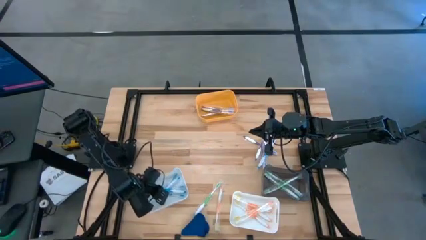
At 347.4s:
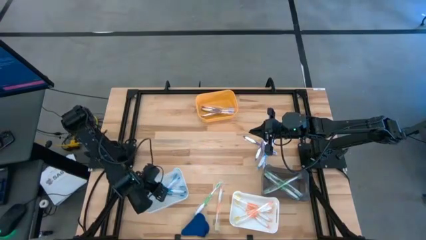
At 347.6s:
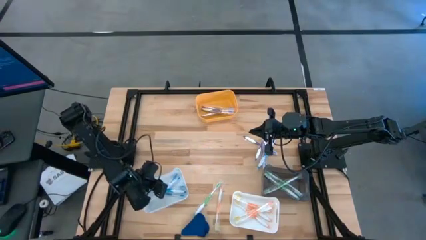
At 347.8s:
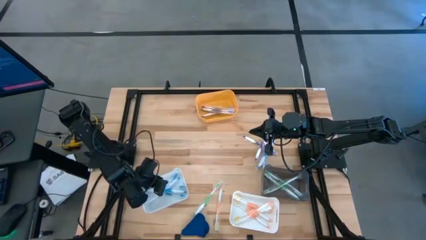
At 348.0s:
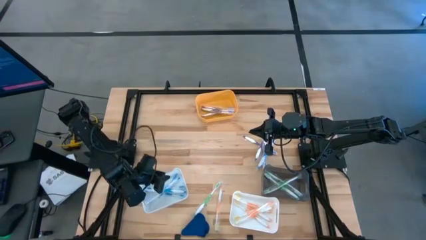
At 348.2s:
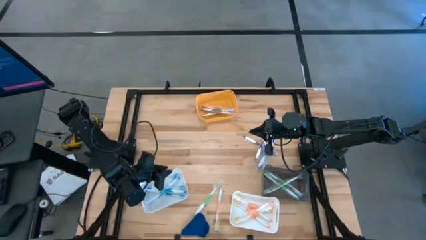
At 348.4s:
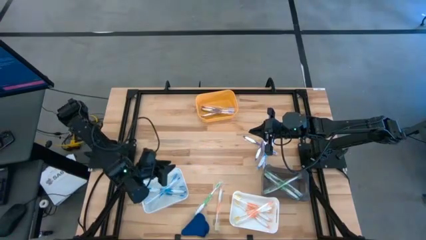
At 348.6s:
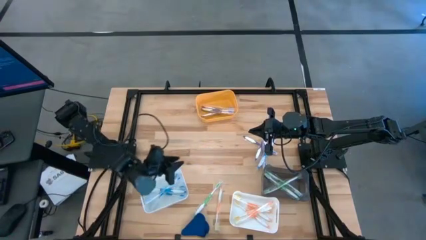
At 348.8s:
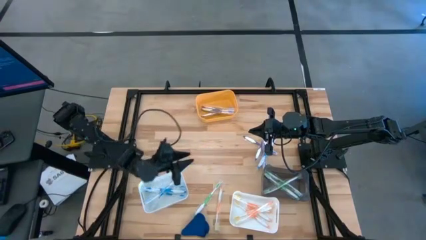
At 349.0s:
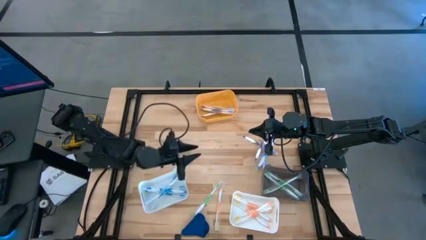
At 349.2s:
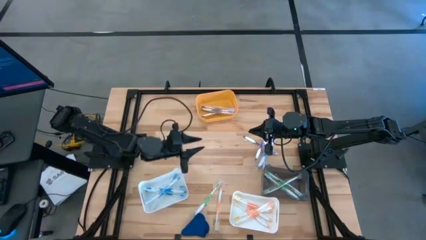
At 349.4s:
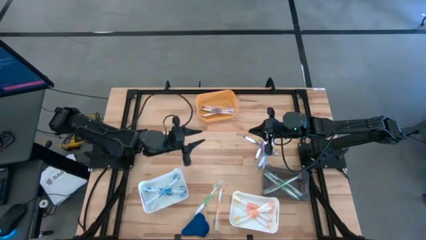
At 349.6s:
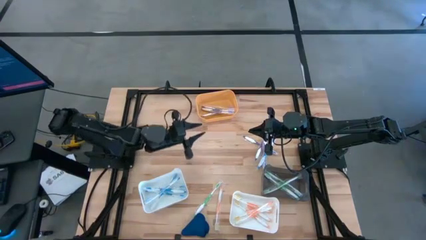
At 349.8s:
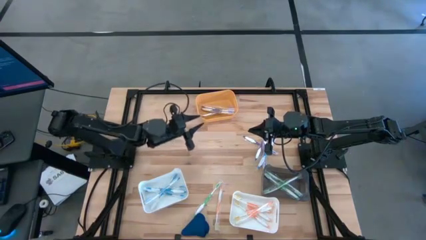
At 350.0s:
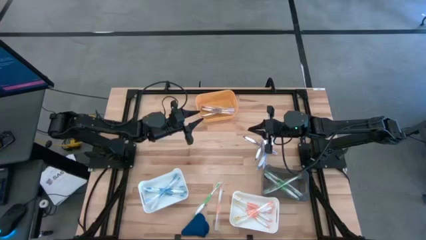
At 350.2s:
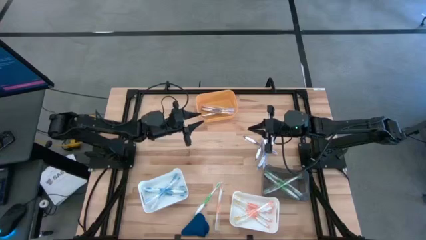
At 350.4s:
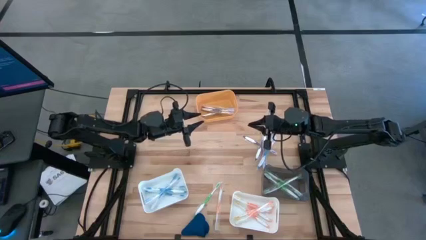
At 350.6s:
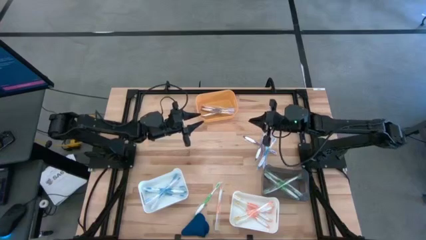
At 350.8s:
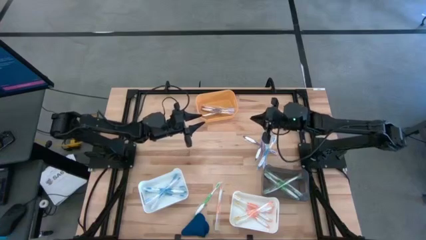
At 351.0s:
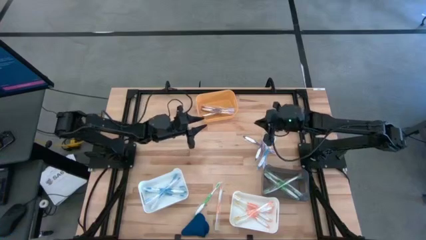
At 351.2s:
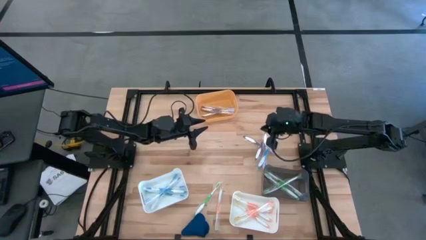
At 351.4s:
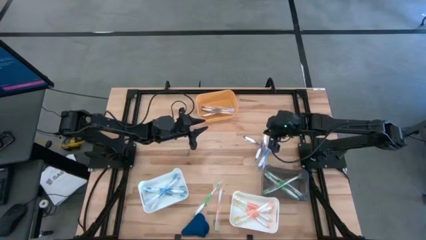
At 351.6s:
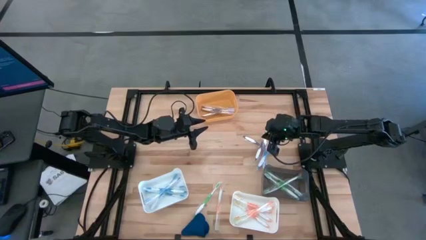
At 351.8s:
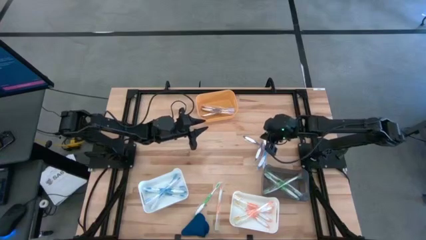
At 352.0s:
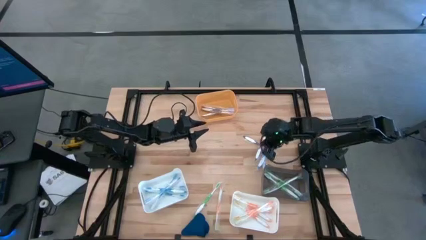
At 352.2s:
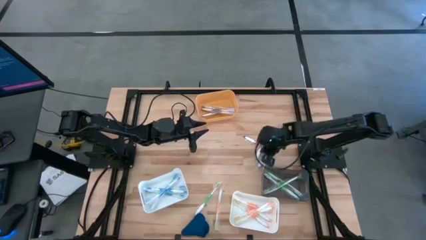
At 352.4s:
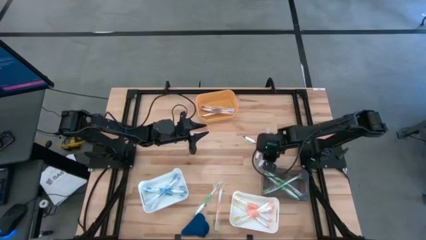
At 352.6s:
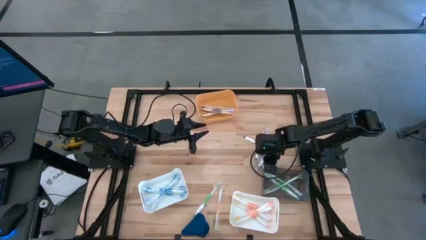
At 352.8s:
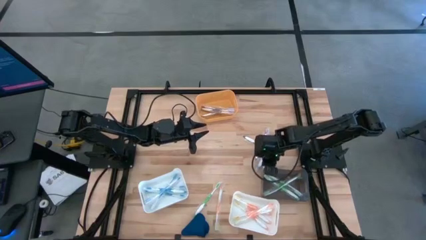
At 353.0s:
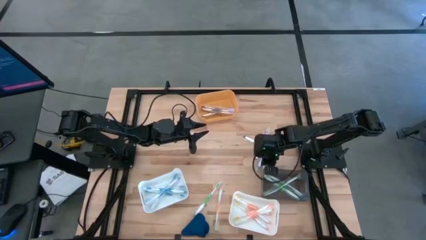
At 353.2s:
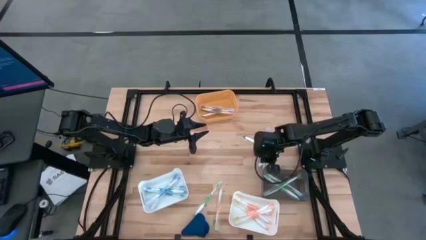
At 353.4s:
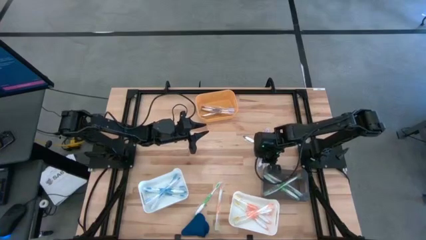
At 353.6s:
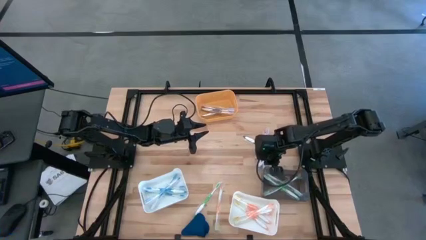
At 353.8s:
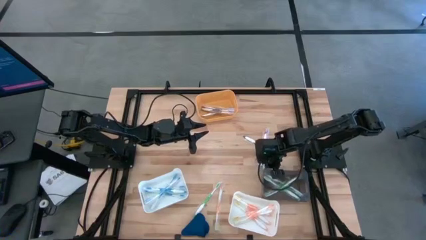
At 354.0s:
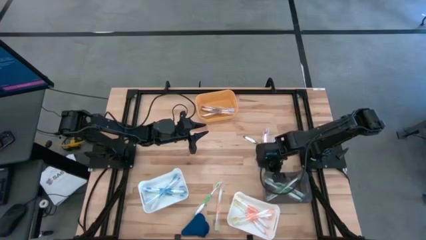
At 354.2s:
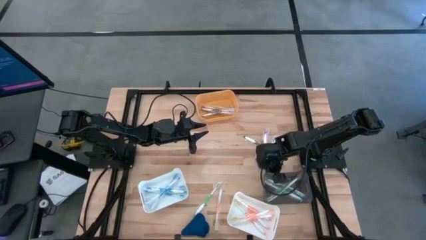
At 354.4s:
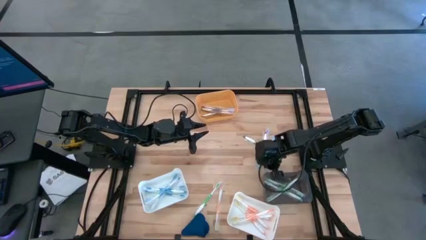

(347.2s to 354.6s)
Task: Pick & Place Toothbrushes
Put the purple toothbrush into the yellow bin

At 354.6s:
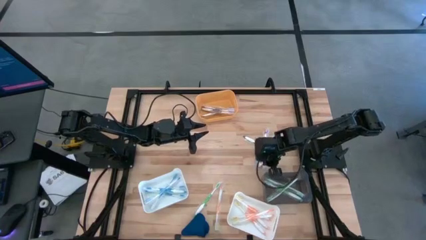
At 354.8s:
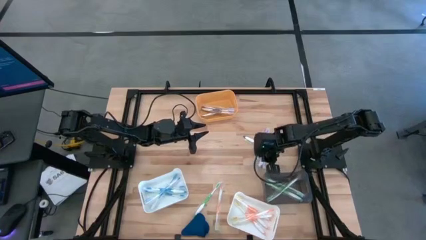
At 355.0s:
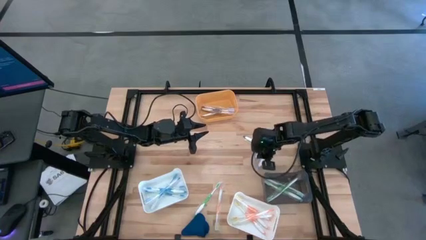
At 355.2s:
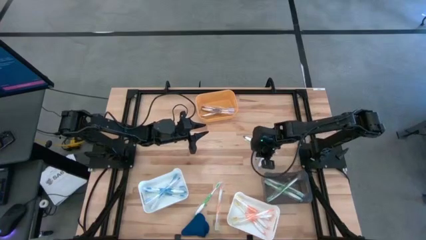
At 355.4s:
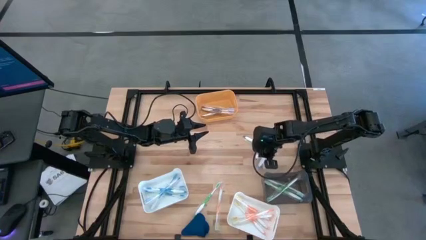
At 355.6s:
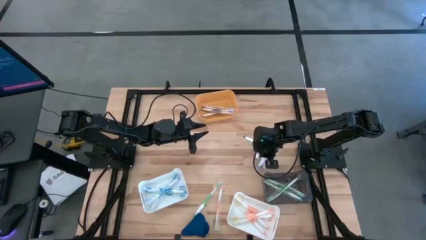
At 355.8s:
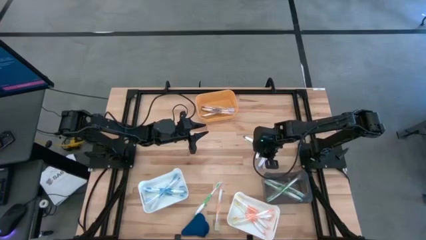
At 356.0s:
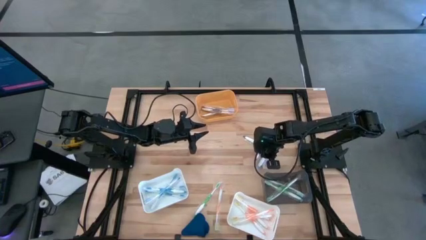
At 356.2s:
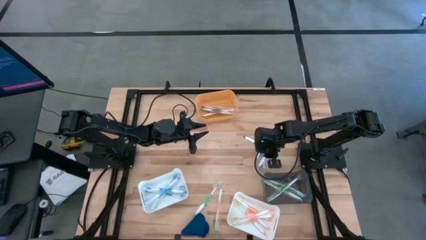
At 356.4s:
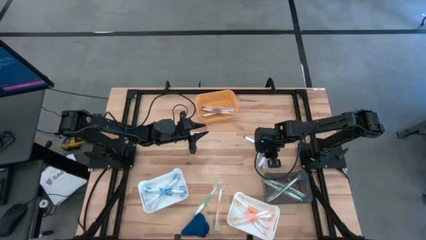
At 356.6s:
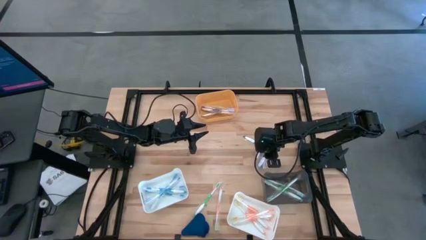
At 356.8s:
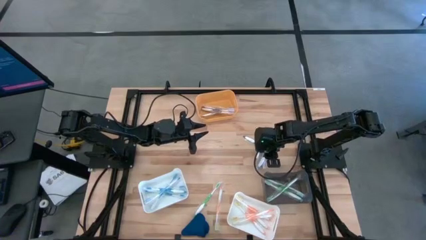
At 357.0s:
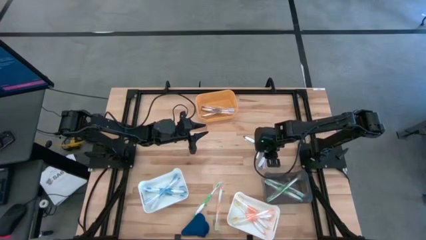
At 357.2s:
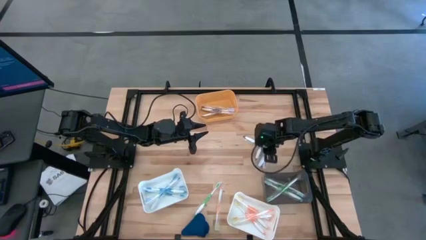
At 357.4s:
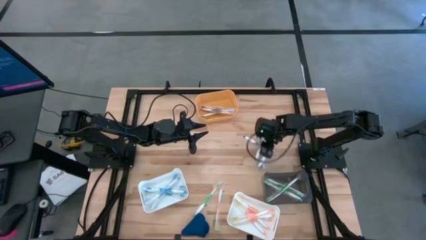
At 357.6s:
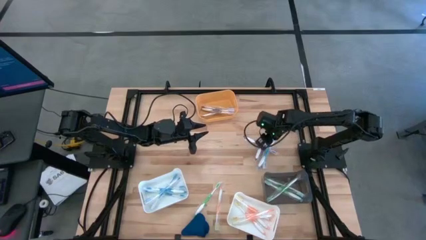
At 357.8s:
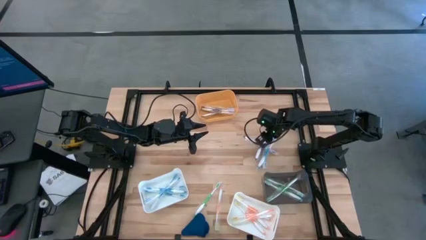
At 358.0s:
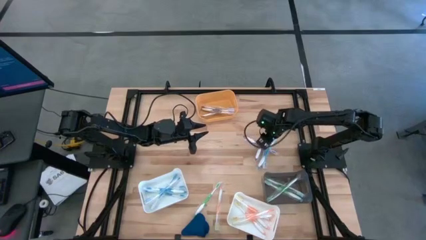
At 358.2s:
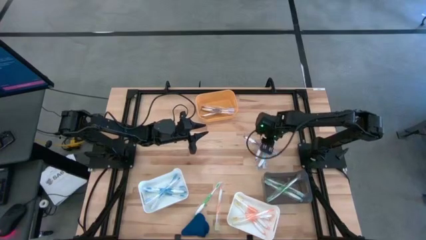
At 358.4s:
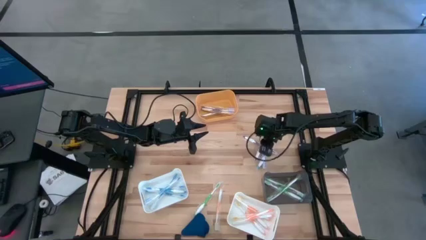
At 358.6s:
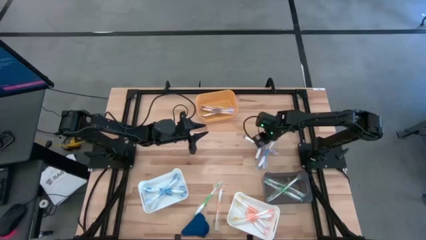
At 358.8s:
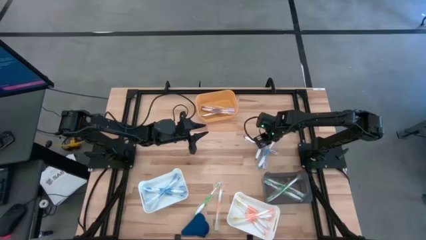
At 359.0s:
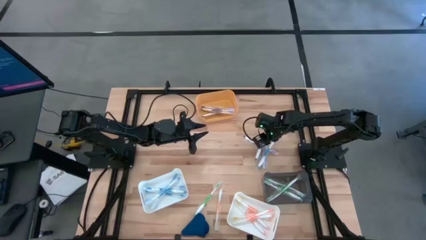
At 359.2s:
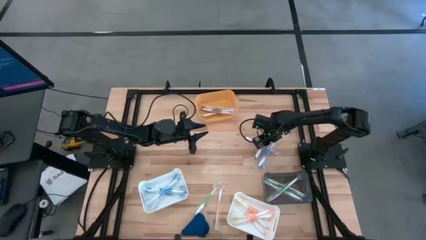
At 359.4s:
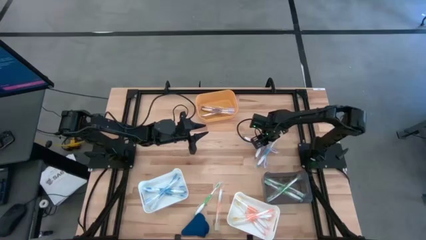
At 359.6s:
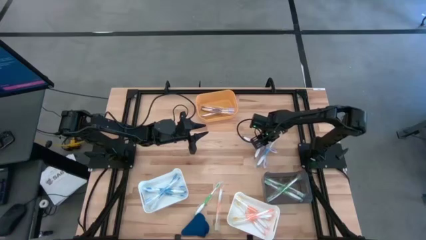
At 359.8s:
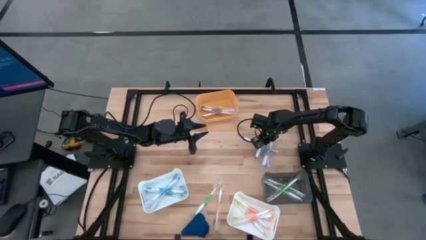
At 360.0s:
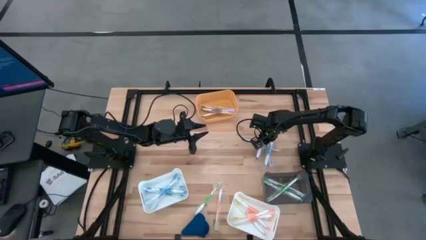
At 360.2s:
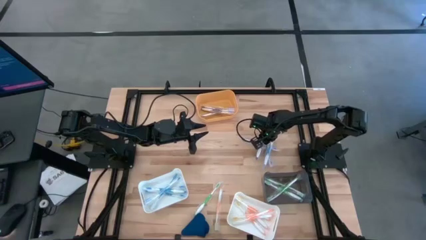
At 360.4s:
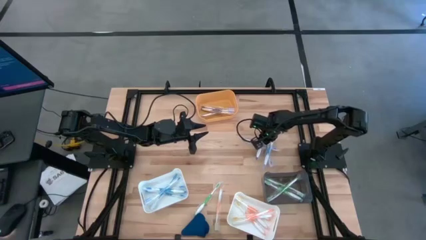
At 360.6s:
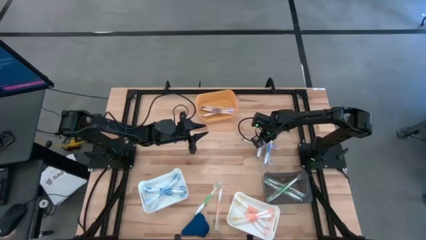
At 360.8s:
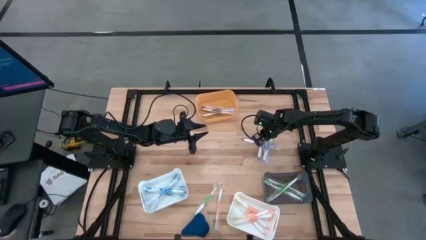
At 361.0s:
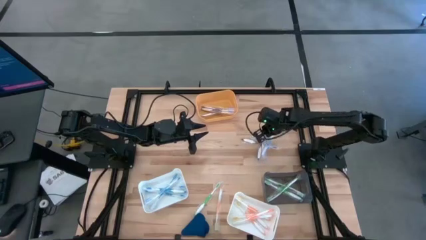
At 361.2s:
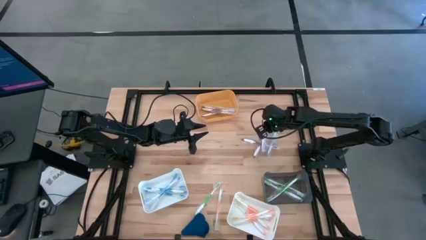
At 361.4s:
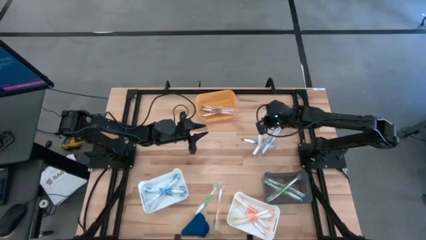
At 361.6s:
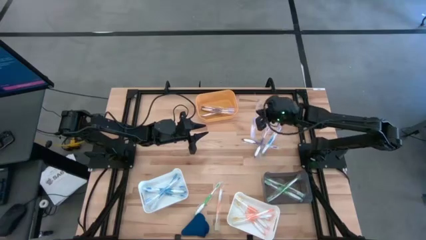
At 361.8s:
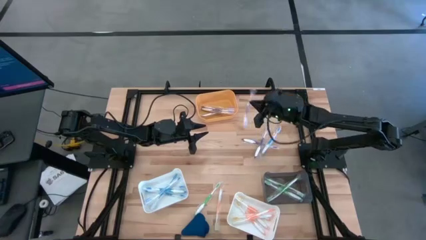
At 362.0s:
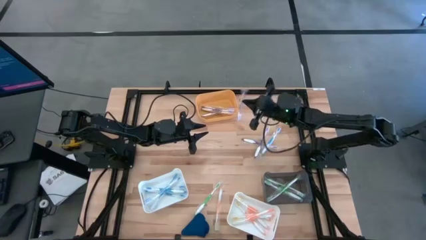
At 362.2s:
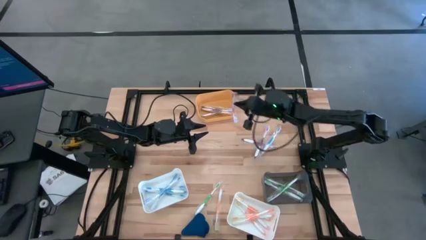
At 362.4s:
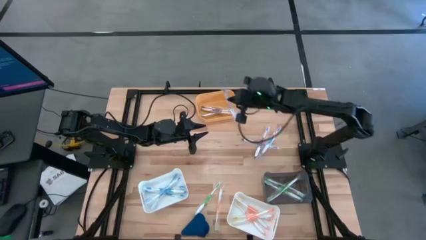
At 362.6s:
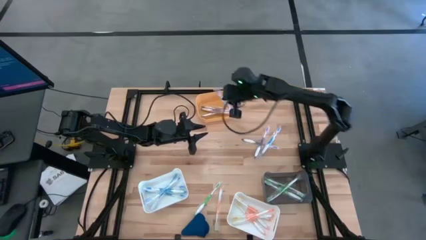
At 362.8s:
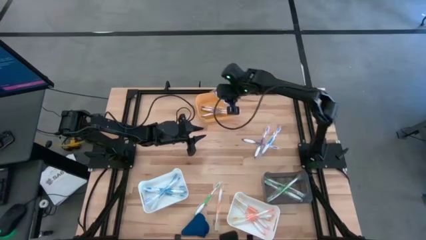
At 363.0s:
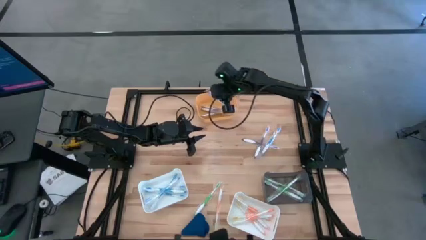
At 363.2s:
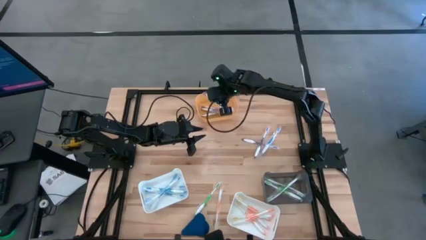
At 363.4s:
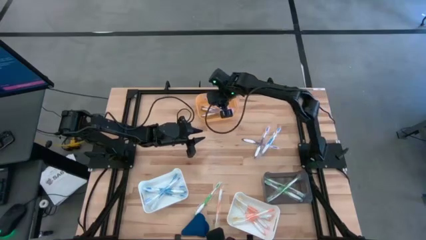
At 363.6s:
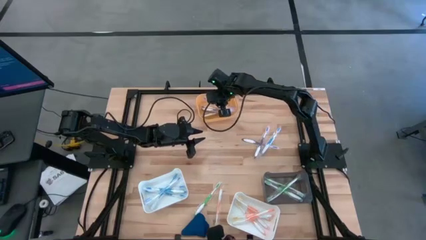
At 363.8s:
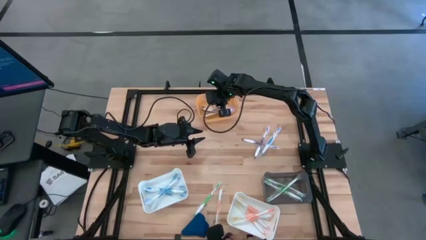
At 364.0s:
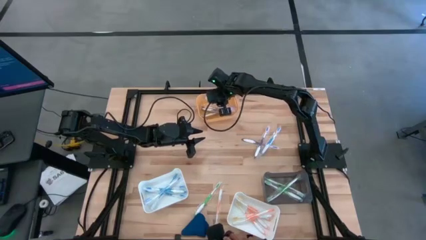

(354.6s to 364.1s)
Put the purple toothbrush into the yellow bin
